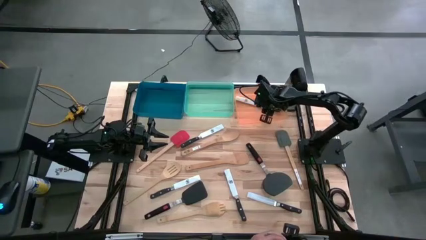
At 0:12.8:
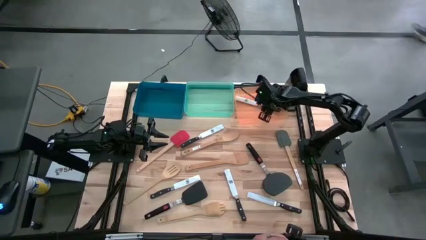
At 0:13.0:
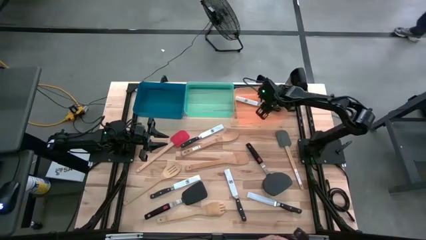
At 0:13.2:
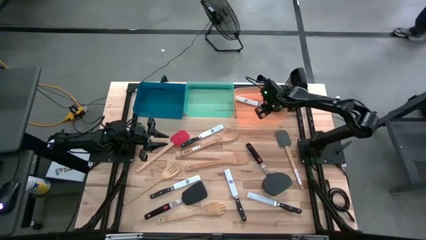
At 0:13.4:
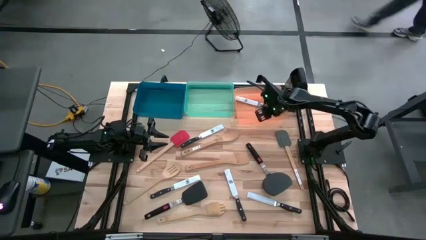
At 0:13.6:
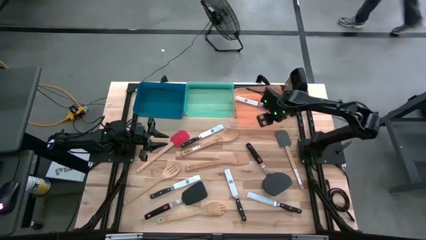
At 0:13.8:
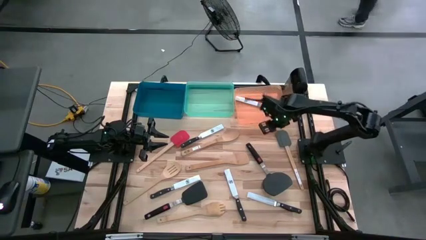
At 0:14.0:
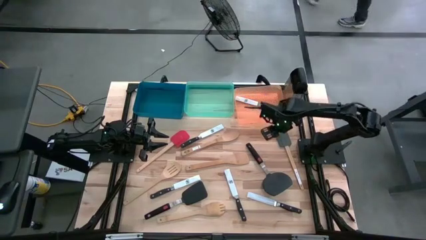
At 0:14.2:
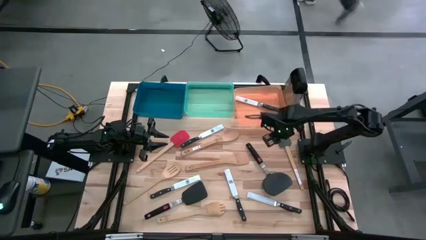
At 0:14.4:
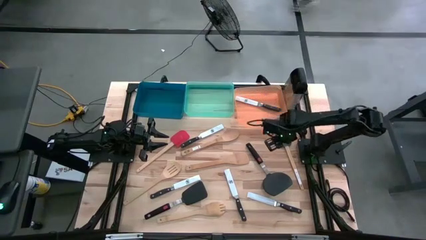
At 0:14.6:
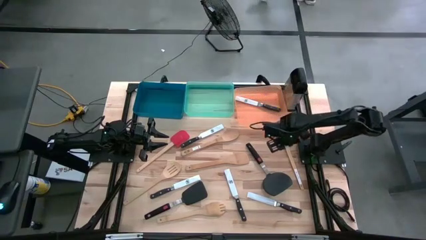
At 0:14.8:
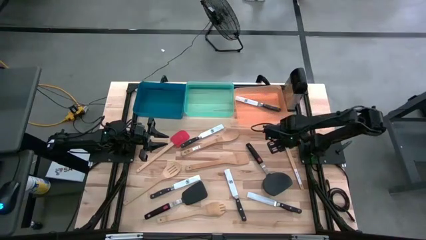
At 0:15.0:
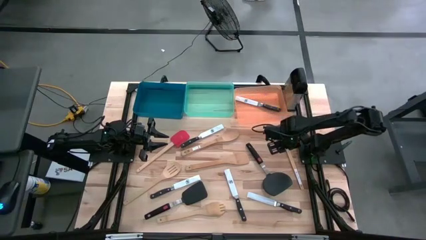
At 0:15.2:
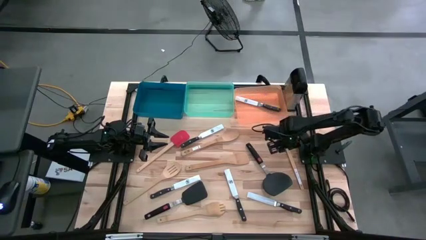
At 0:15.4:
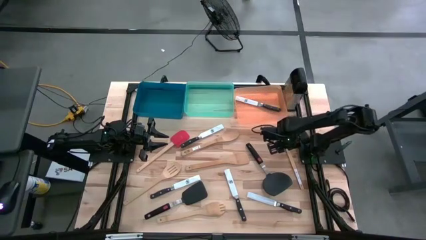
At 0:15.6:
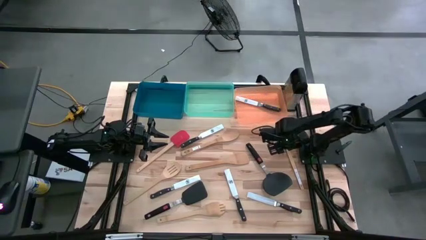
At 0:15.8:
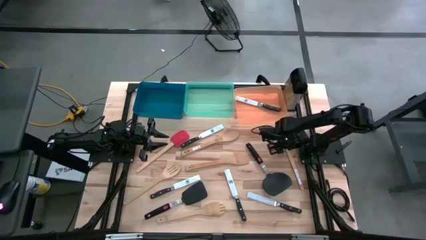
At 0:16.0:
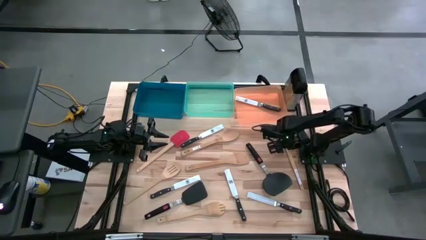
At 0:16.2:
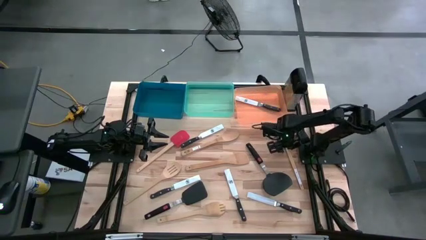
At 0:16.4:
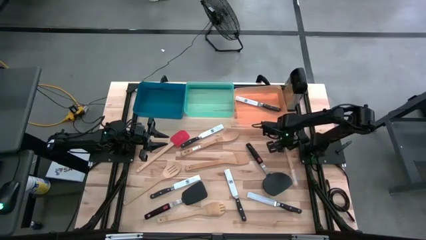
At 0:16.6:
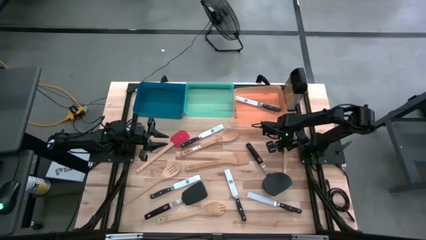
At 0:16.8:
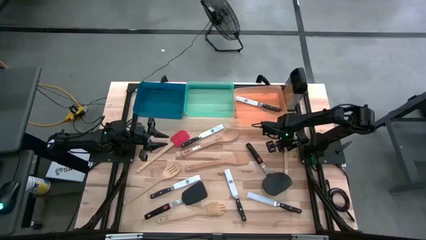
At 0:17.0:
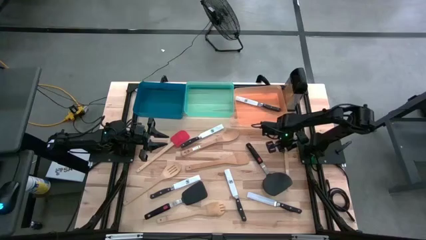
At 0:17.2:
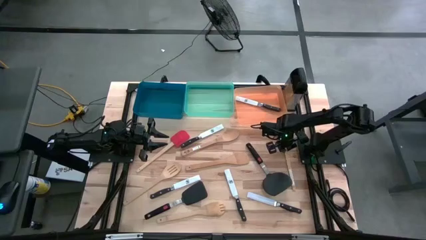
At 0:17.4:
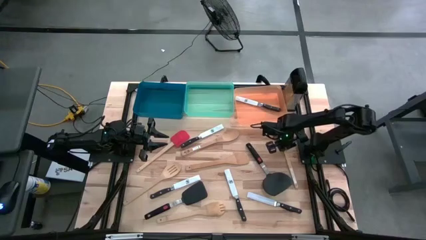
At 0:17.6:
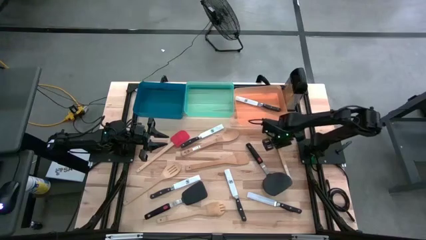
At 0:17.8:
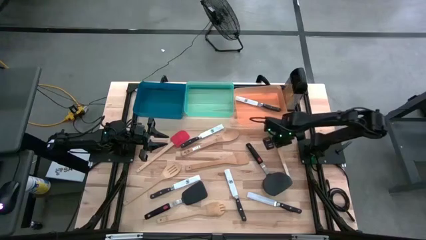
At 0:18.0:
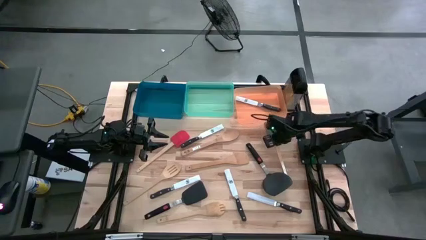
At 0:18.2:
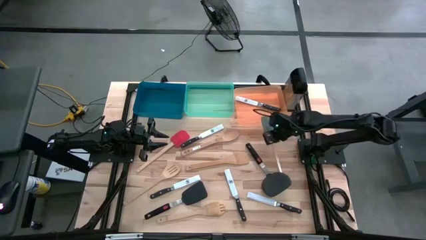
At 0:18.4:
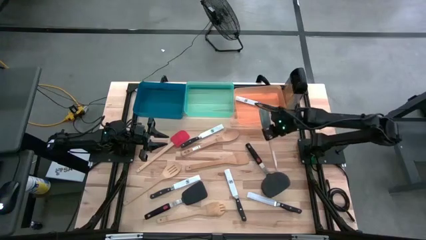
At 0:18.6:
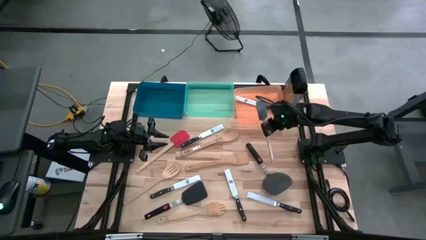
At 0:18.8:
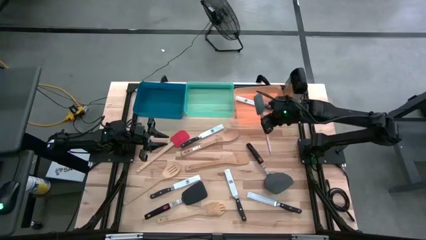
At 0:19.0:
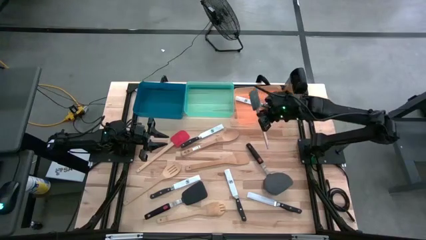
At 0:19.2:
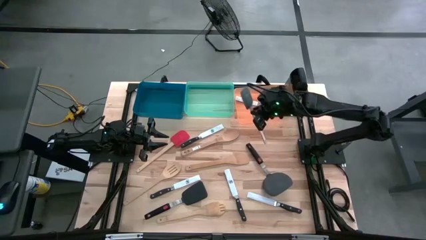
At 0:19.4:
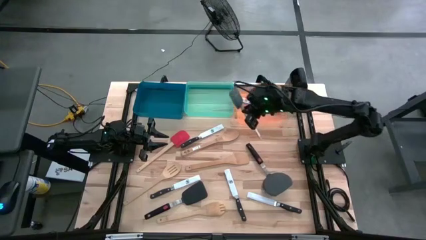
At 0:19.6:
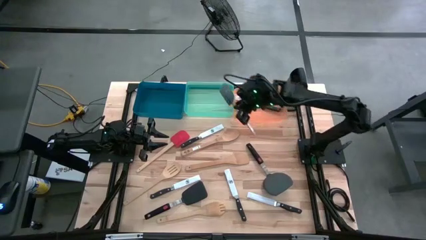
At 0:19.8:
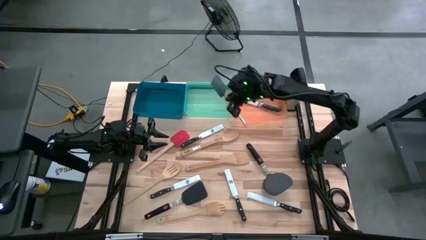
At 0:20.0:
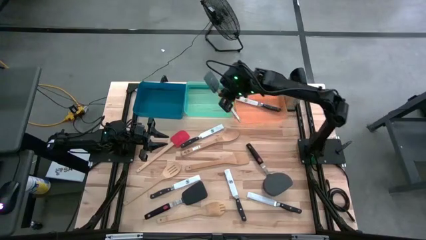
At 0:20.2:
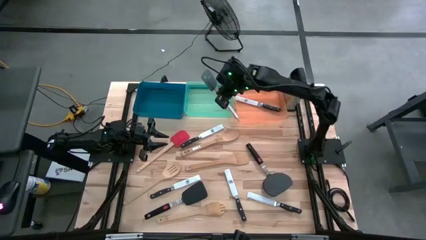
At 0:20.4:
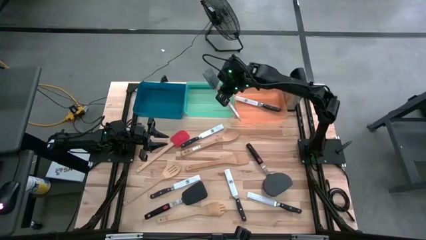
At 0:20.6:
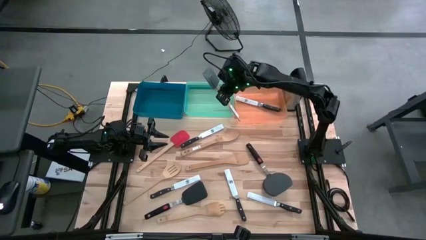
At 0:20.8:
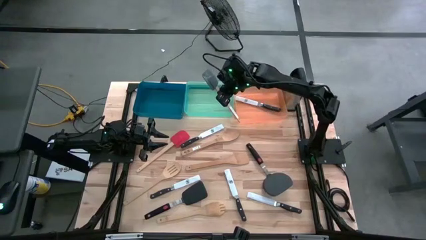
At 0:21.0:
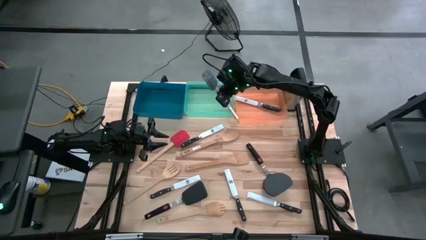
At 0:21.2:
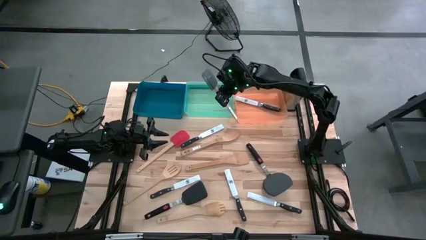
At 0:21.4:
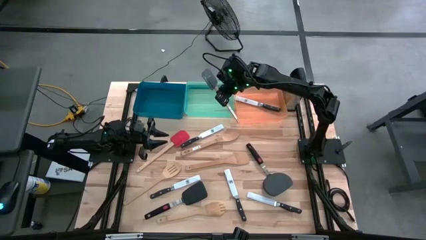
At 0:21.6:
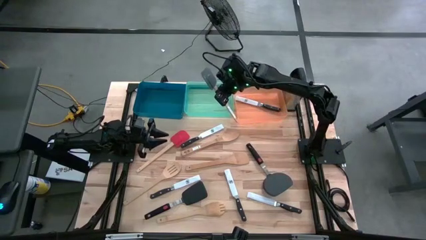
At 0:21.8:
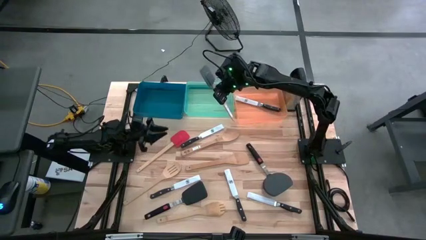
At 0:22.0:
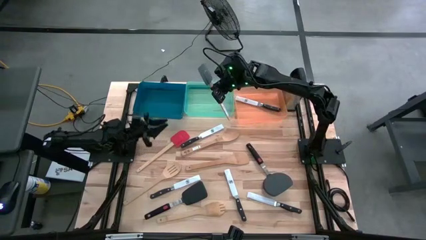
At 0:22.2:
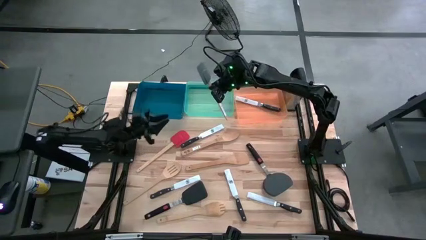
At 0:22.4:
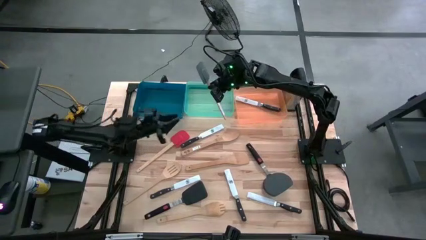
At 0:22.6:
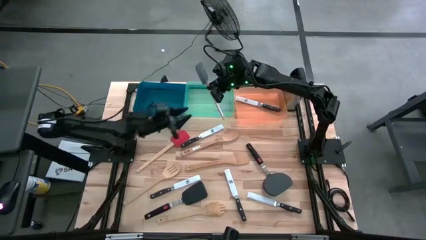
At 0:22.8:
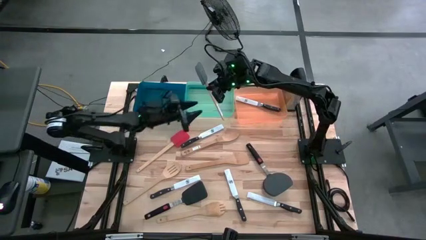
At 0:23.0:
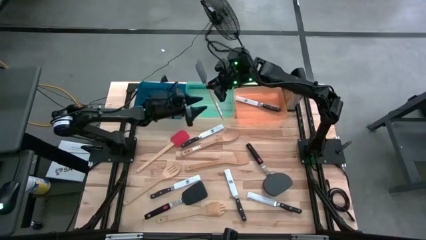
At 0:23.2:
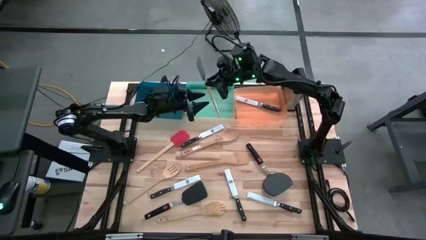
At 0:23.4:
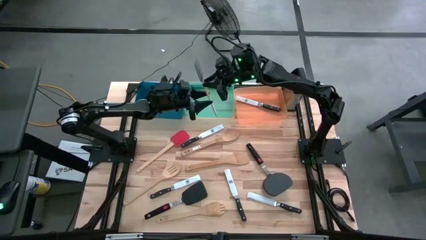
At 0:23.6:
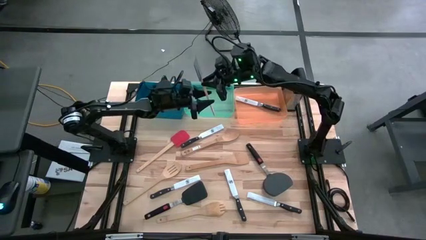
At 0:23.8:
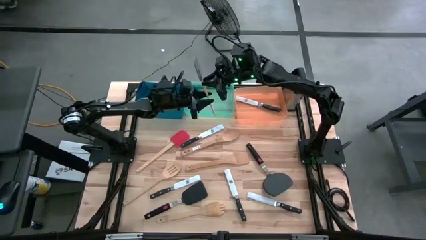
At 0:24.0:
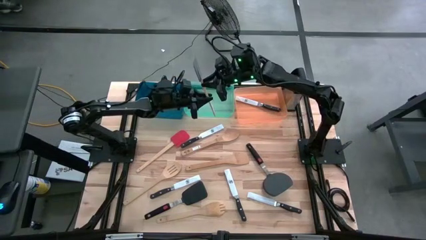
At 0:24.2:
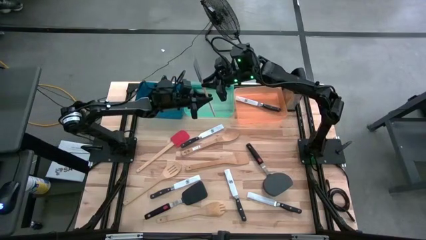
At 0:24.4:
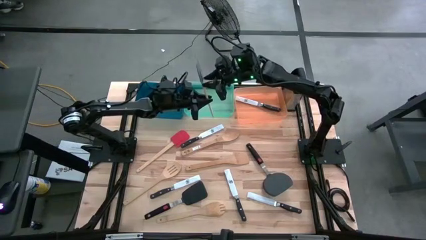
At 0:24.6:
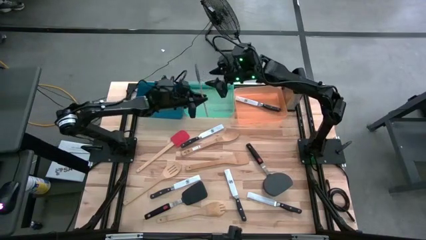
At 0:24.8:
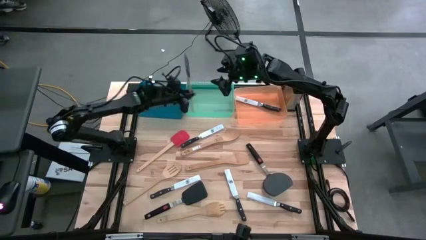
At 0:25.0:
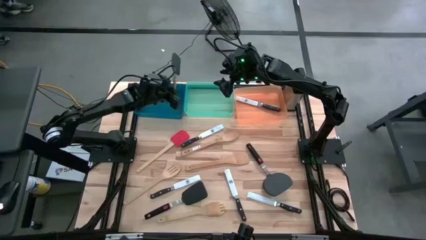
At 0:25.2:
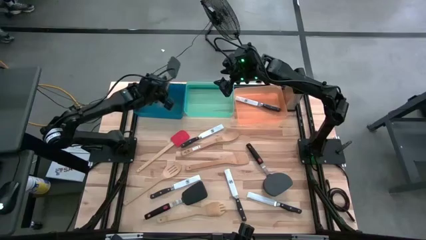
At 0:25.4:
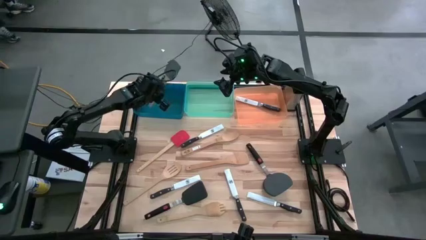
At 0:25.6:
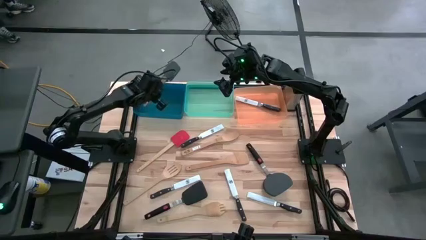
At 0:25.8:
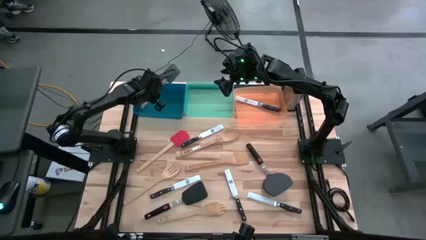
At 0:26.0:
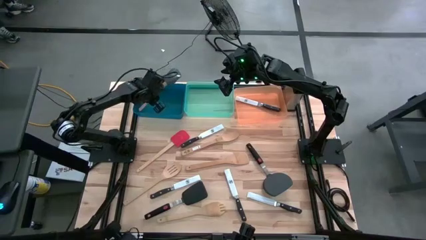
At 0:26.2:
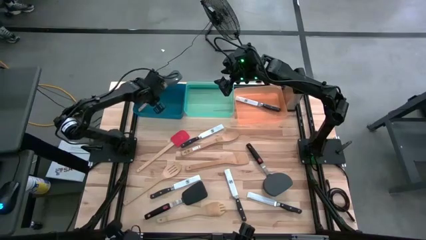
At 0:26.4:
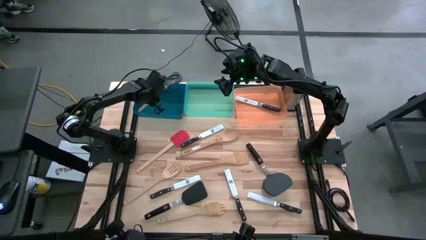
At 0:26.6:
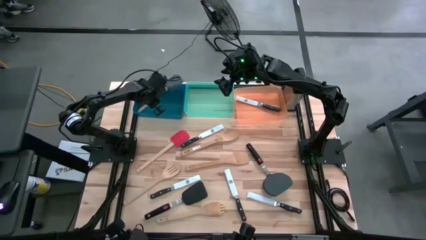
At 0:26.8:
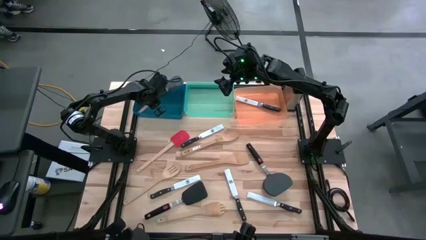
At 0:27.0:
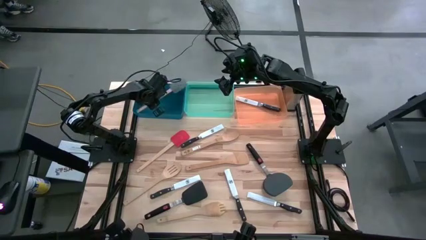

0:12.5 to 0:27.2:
Task: Pick & Place Kitchen Items
Put the gray spatula into the blue bin
